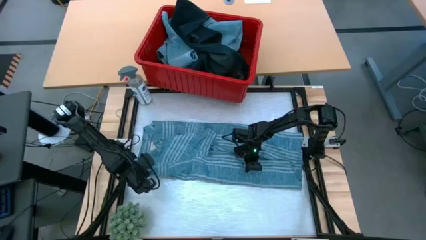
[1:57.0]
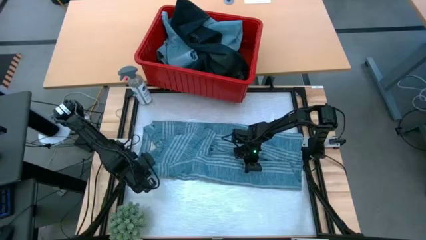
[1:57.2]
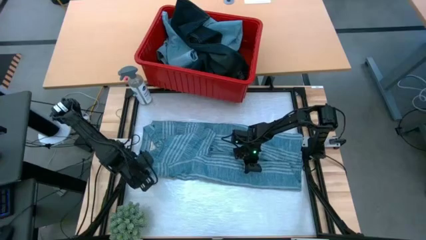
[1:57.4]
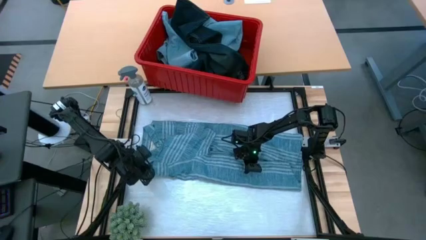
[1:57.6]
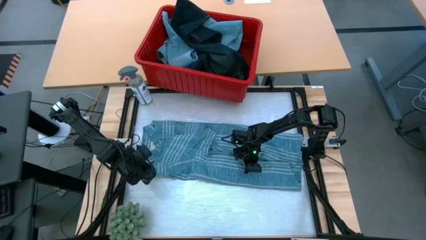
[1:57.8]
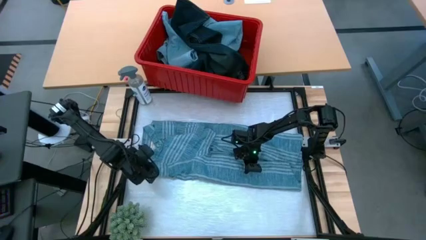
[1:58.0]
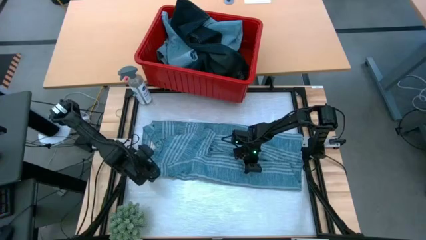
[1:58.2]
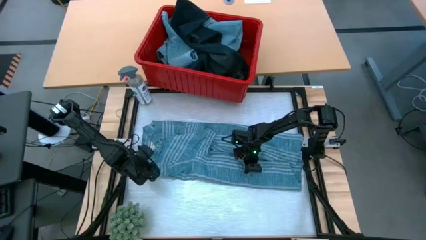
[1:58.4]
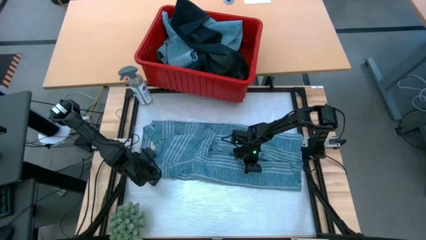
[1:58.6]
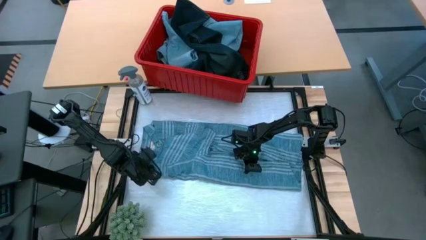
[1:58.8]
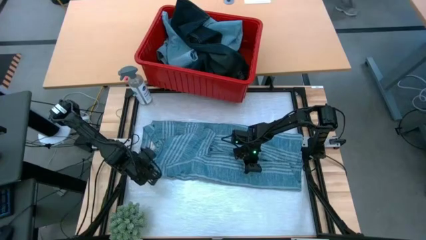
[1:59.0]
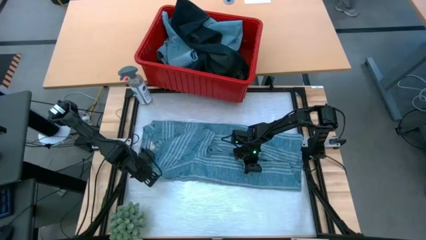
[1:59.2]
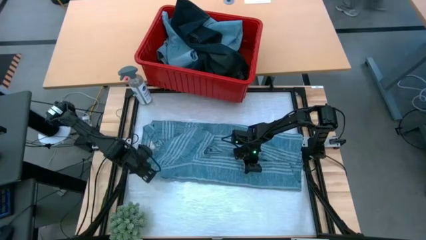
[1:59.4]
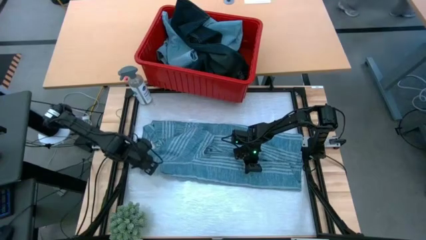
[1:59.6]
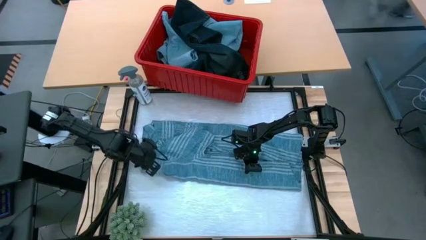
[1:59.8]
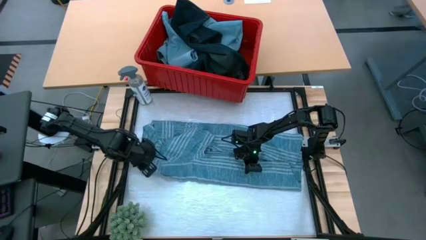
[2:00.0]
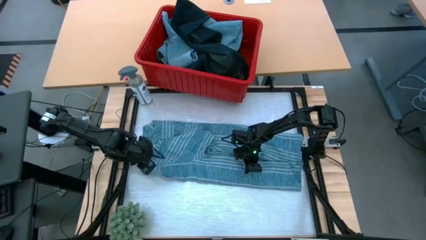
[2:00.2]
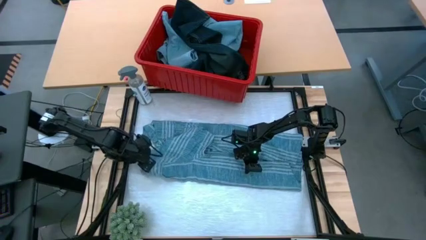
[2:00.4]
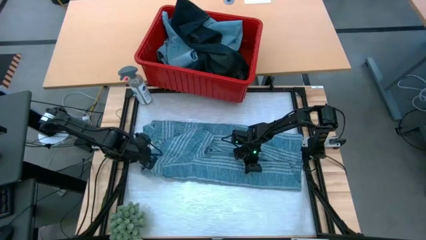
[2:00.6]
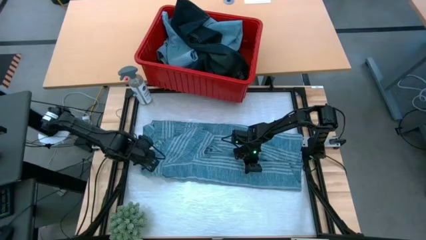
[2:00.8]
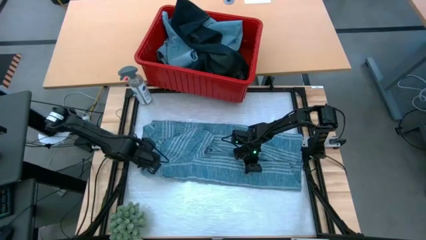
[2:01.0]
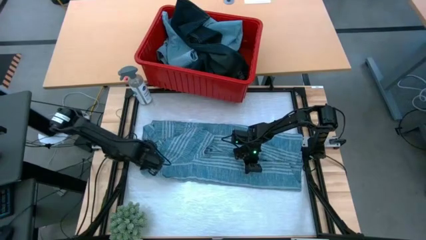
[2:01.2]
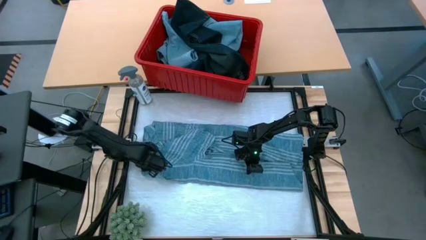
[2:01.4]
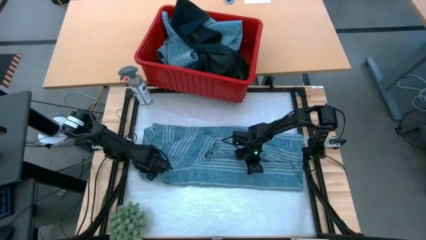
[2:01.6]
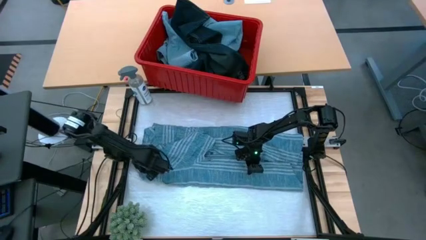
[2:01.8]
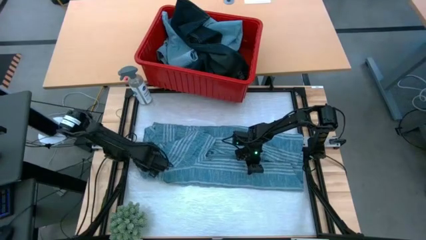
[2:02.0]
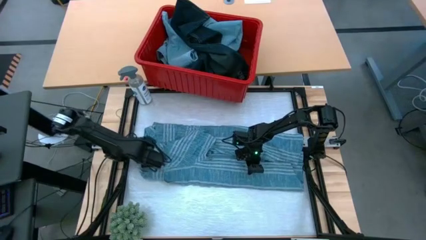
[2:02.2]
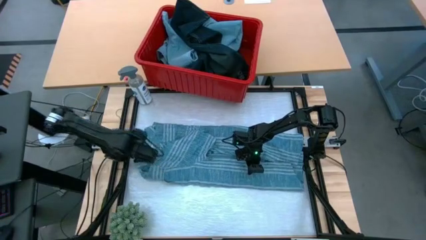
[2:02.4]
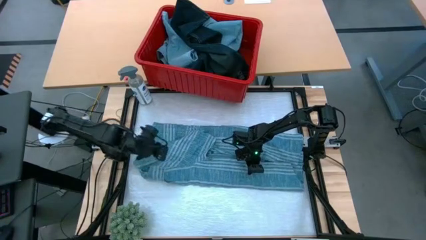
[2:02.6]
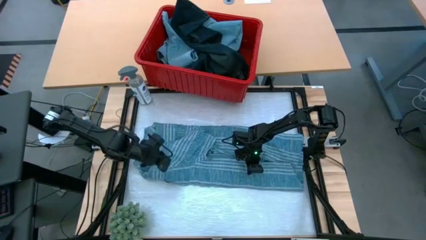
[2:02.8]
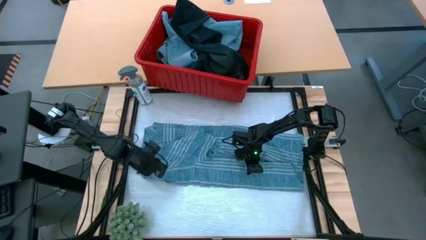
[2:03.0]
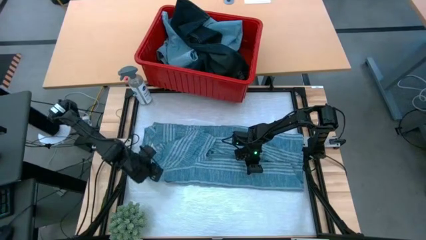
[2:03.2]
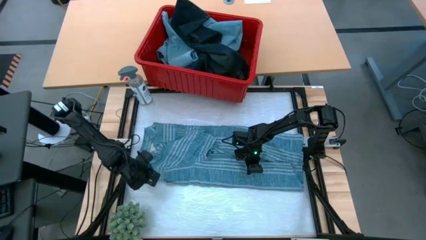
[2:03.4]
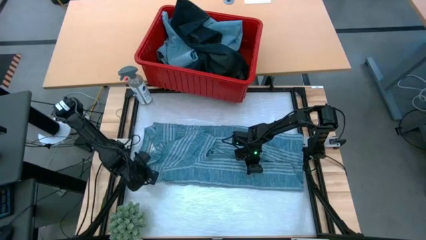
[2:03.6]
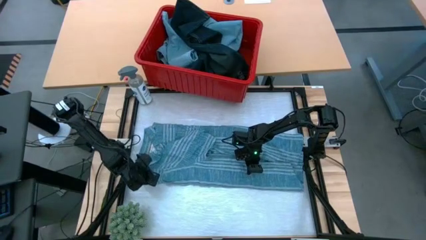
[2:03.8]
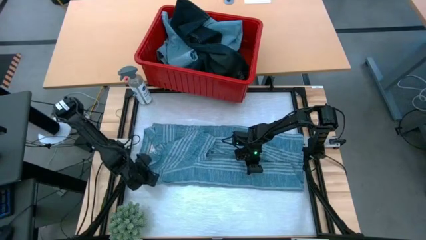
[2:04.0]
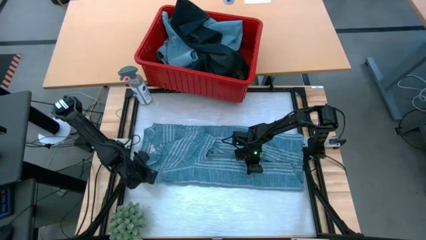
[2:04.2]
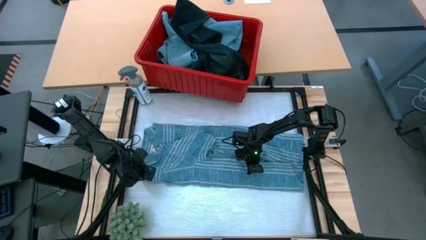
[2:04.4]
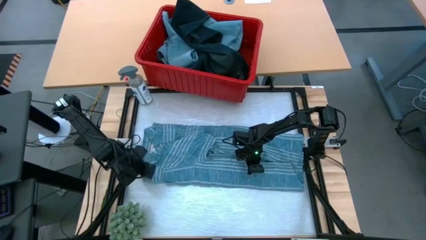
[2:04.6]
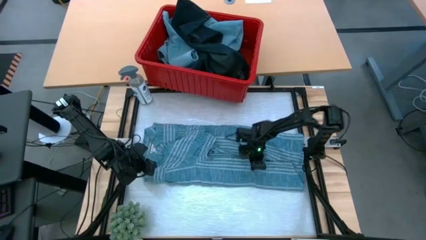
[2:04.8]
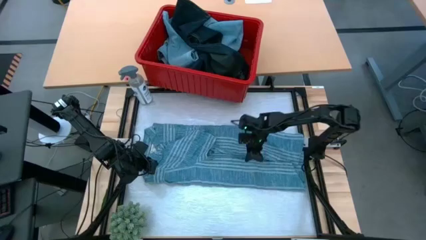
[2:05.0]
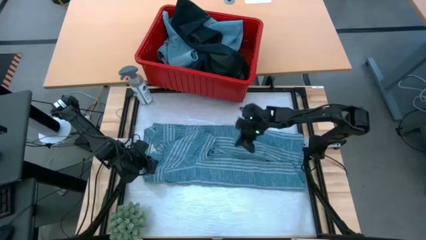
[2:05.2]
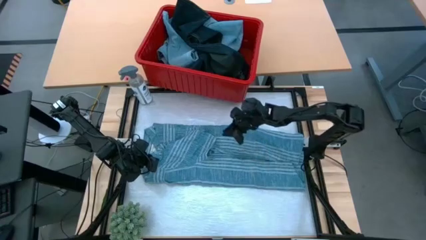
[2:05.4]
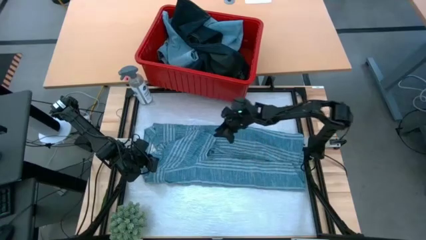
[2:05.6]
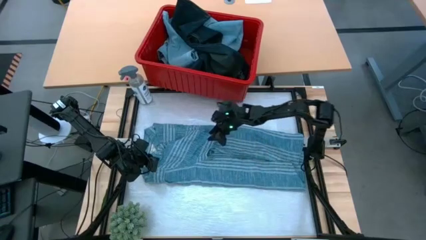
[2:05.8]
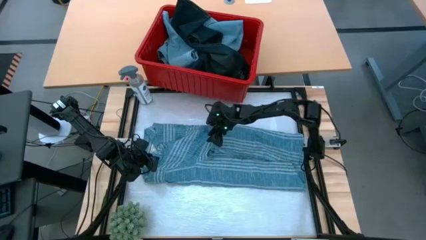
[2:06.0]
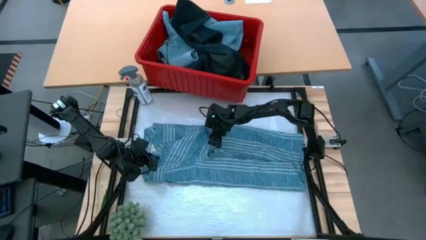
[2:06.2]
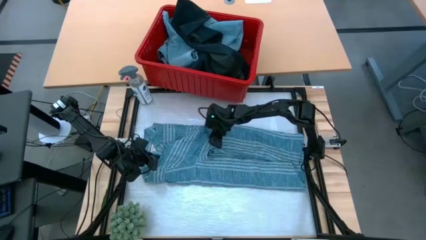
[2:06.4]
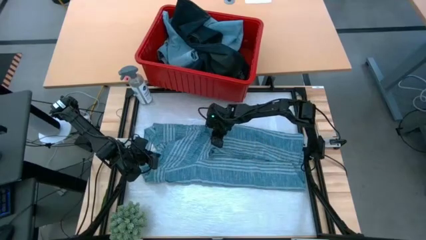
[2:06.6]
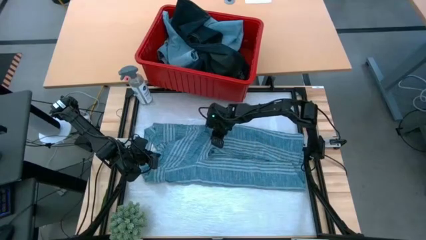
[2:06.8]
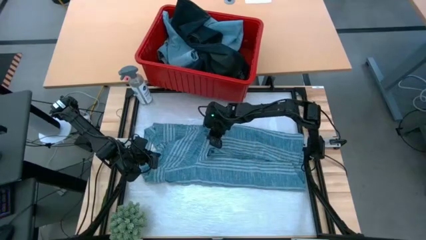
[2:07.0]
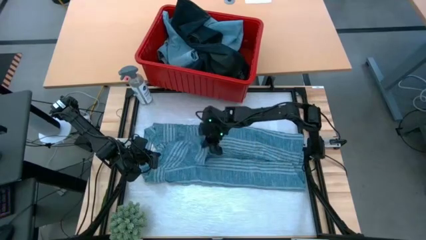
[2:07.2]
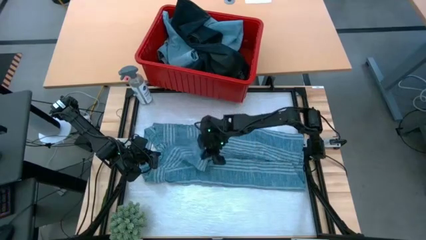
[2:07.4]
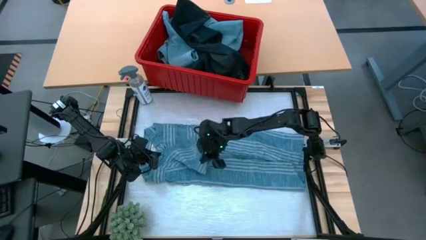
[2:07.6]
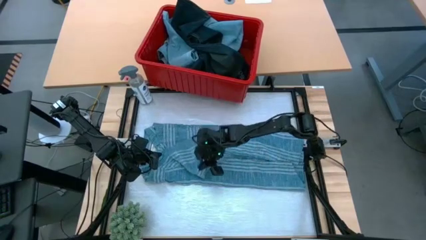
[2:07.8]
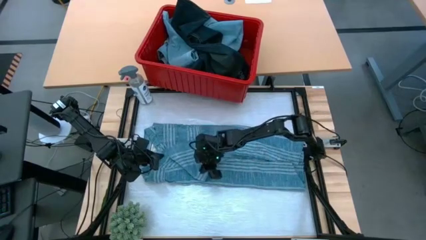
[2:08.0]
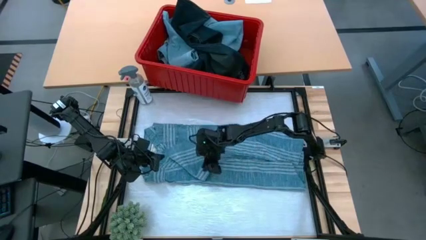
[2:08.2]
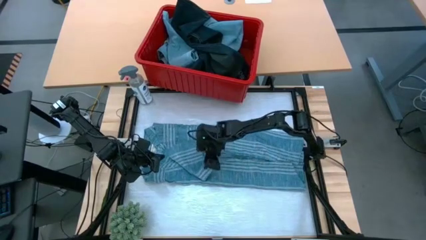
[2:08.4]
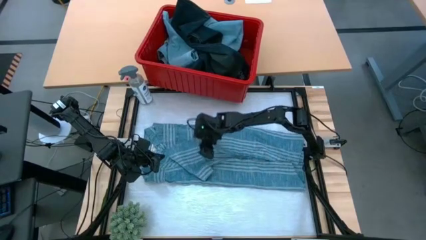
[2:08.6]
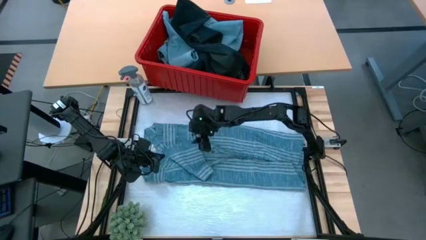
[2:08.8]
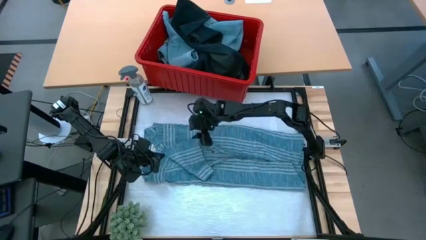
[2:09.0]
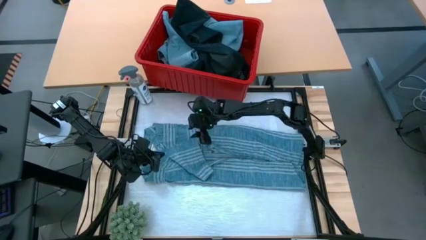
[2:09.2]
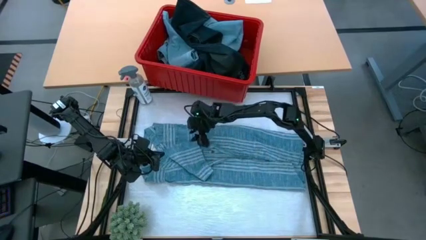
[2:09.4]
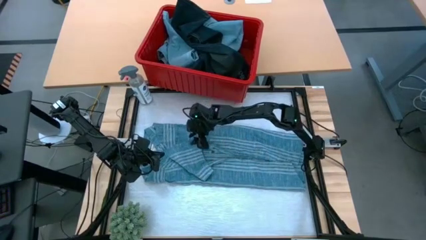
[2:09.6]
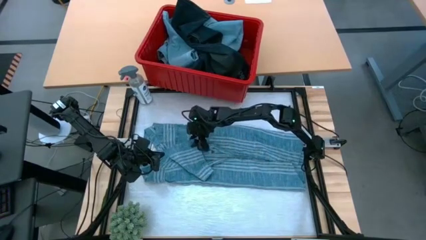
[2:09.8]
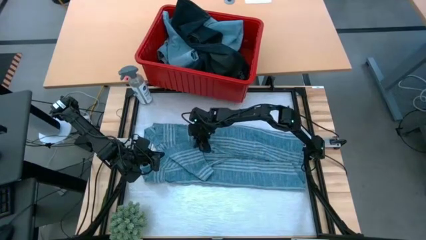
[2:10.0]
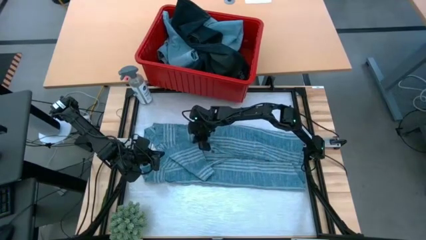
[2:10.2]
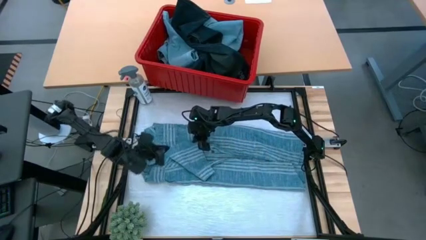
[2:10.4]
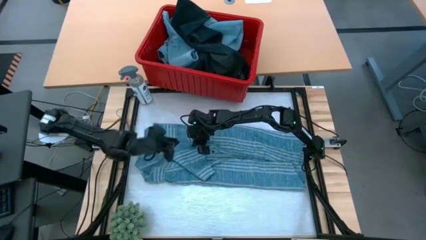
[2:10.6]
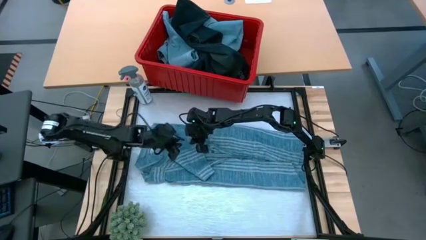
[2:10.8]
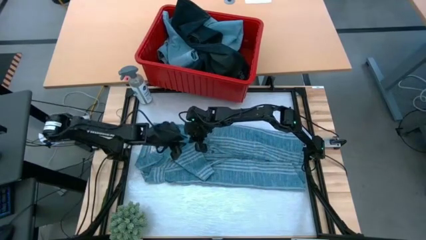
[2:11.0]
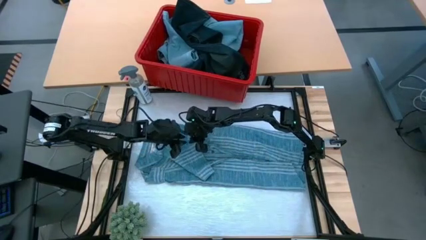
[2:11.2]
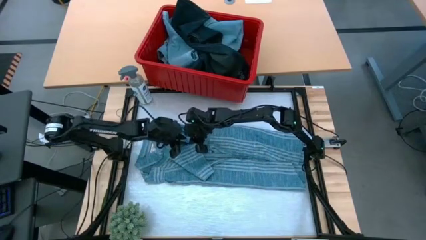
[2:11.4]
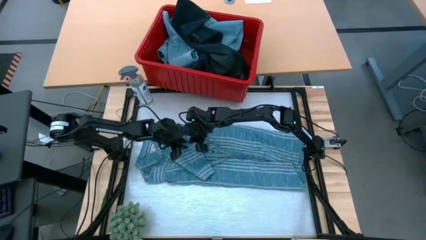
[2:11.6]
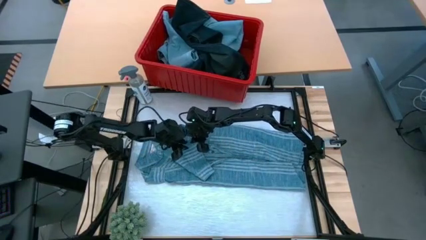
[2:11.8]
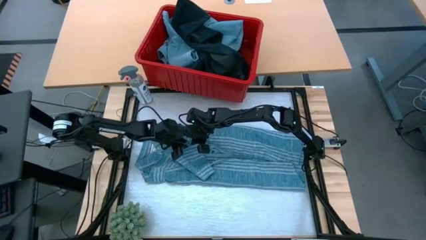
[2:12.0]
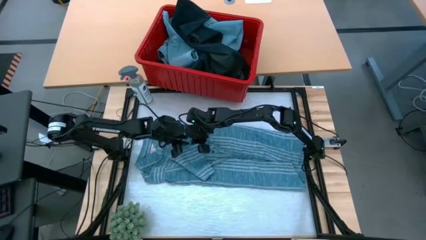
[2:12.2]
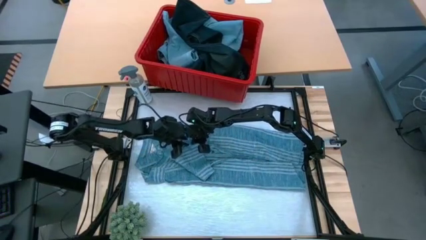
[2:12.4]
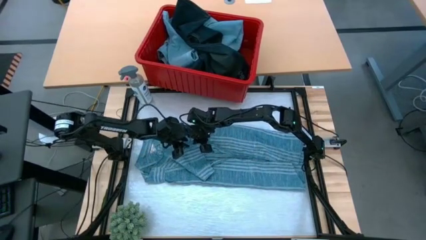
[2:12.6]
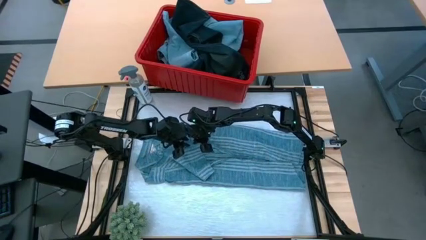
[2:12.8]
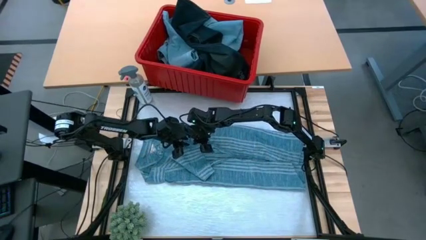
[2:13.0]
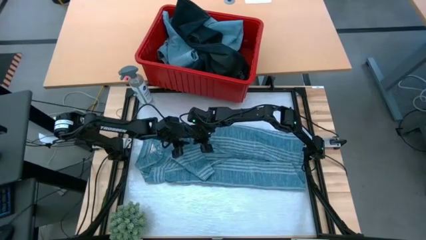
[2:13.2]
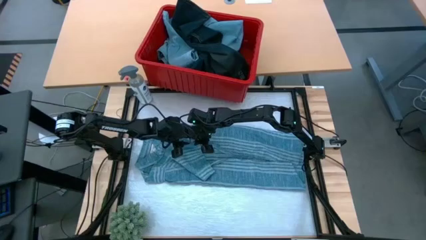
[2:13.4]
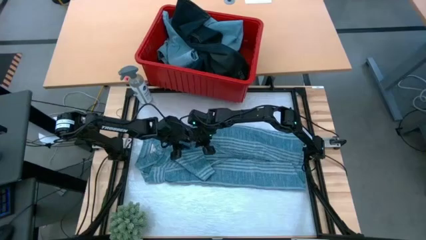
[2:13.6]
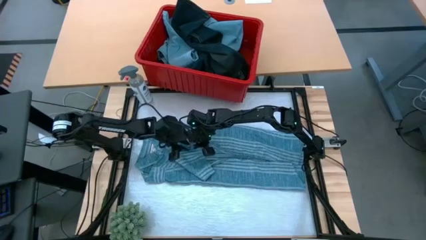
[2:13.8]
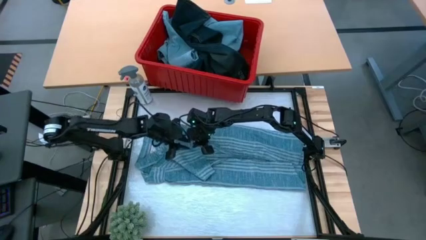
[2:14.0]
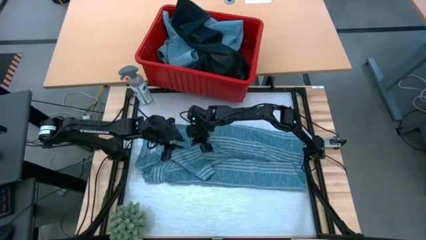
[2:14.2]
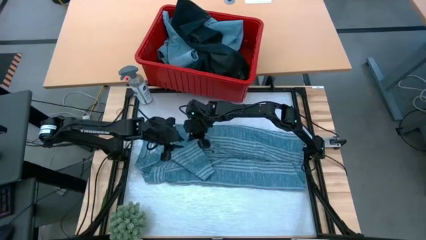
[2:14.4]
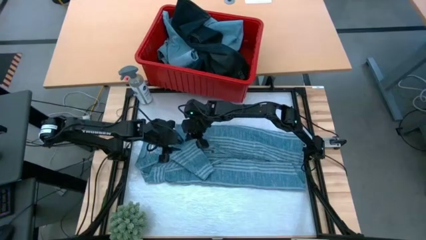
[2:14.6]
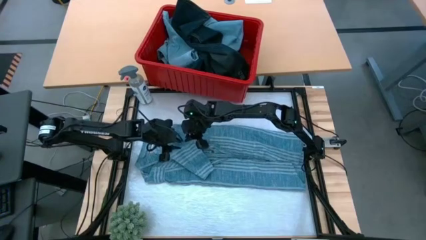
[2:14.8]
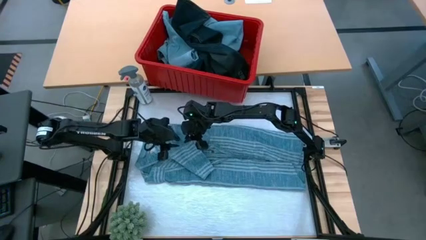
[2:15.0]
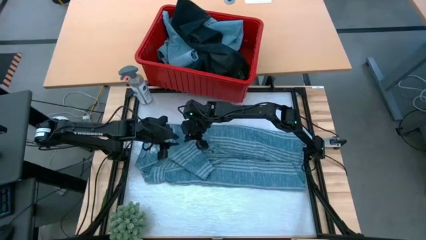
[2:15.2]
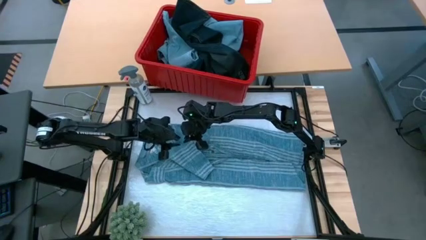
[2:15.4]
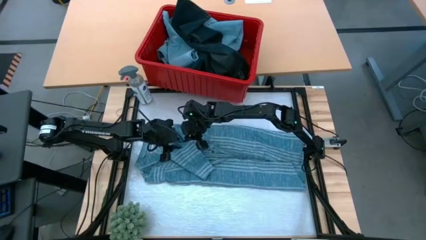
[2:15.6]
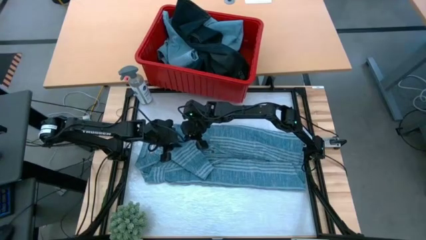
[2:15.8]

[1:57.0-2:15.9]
Task: Fold Laundry from Bin
Fold the light blue shirt
